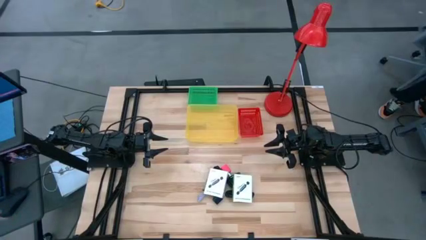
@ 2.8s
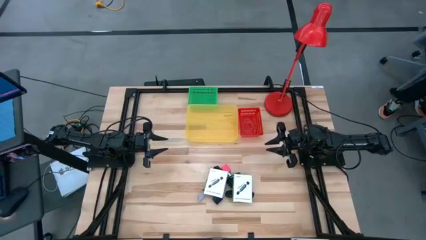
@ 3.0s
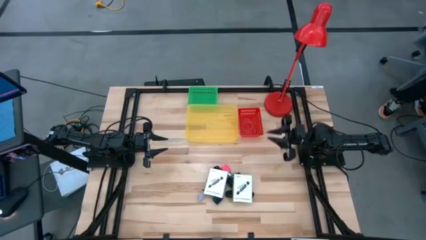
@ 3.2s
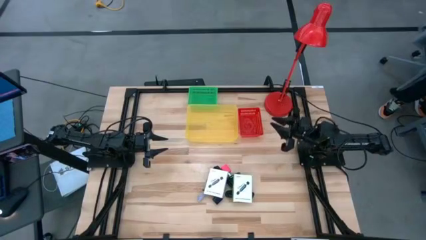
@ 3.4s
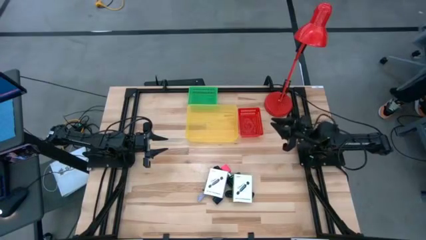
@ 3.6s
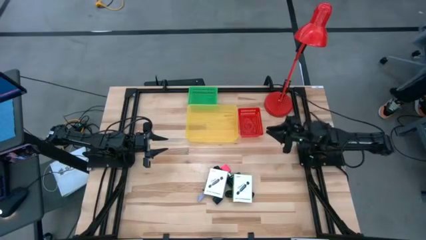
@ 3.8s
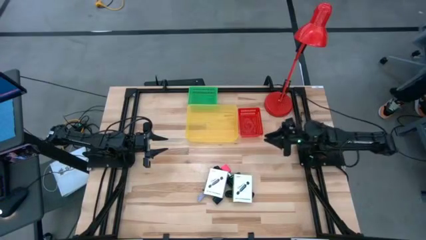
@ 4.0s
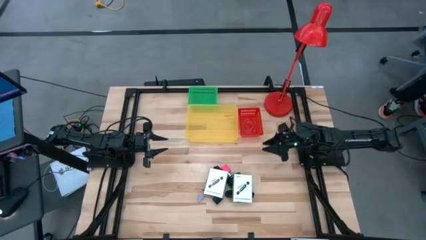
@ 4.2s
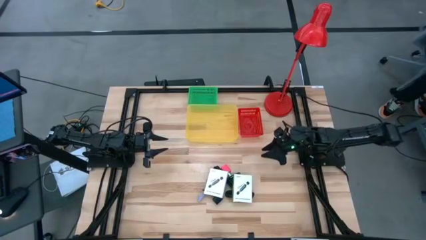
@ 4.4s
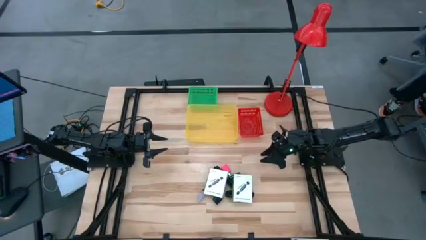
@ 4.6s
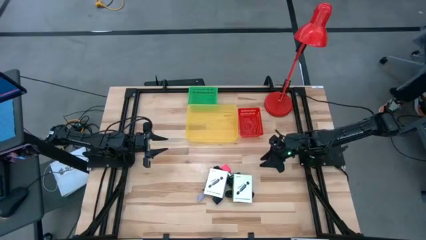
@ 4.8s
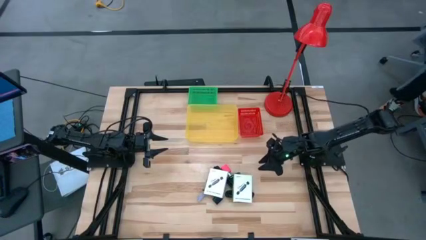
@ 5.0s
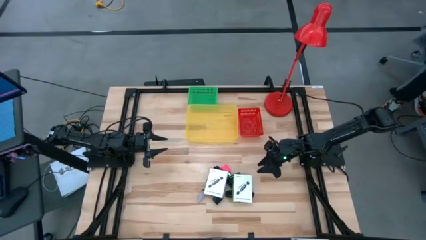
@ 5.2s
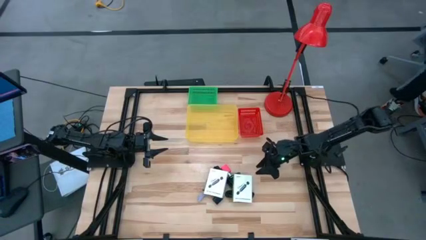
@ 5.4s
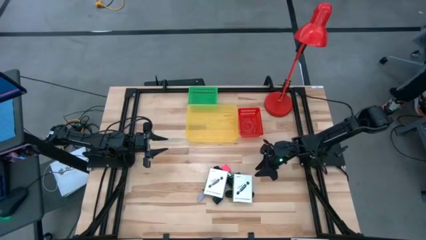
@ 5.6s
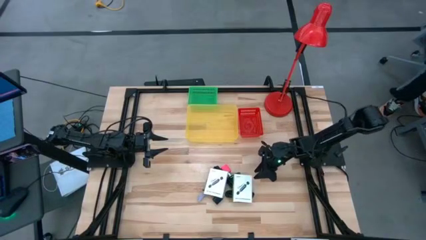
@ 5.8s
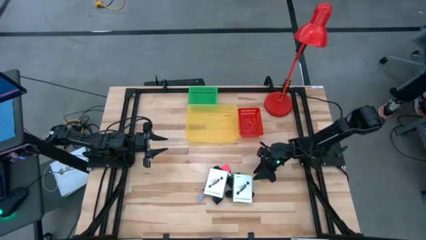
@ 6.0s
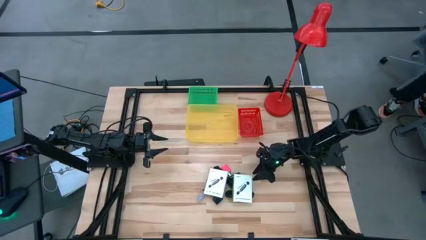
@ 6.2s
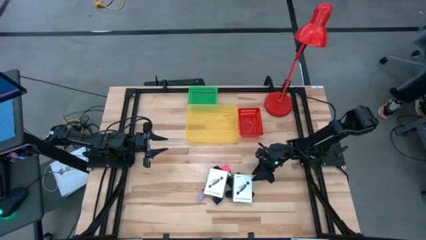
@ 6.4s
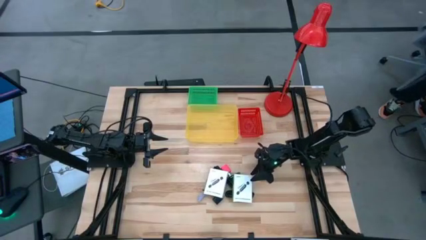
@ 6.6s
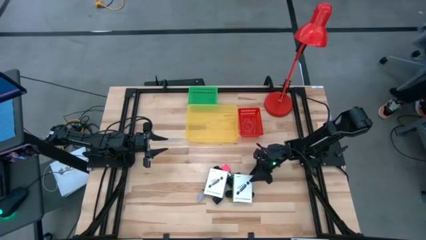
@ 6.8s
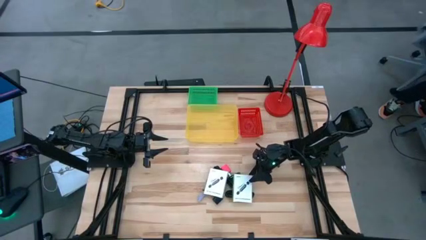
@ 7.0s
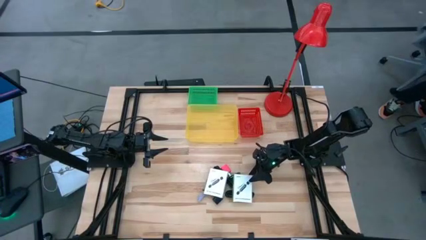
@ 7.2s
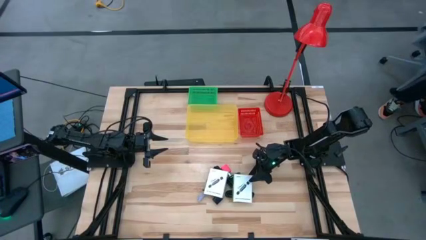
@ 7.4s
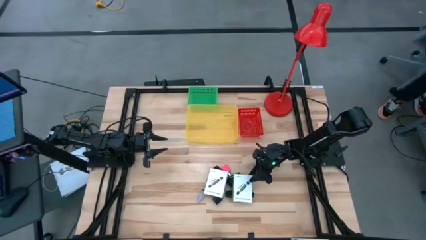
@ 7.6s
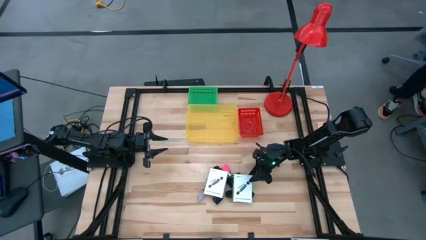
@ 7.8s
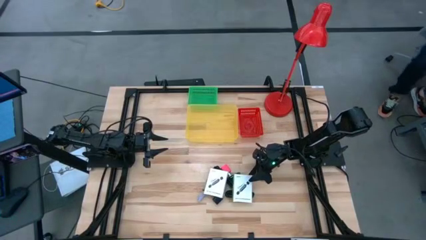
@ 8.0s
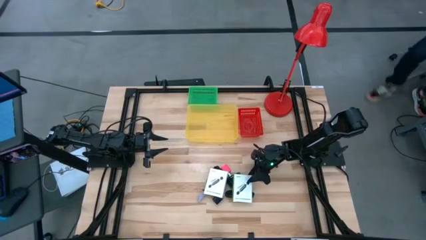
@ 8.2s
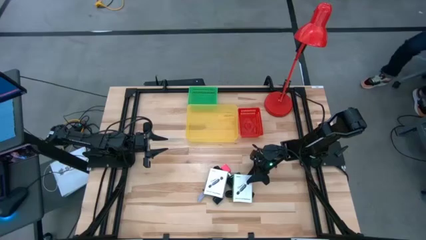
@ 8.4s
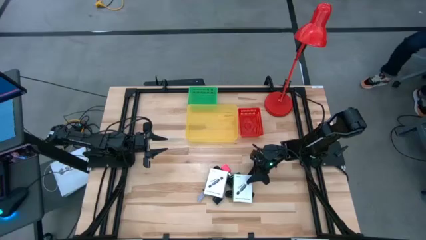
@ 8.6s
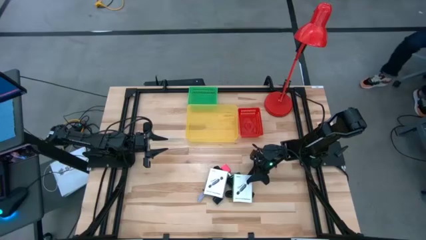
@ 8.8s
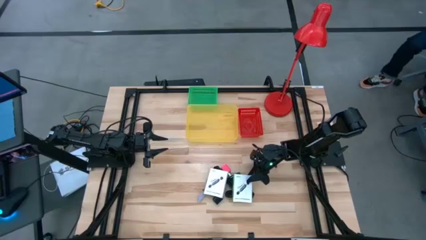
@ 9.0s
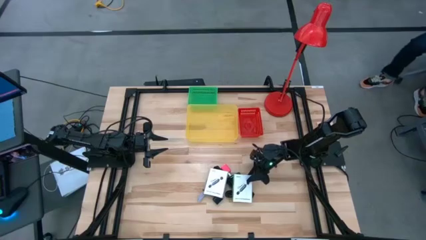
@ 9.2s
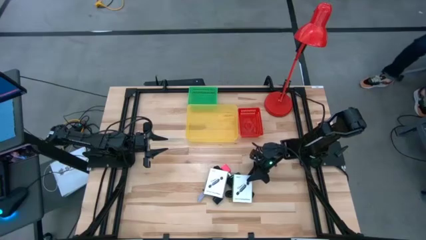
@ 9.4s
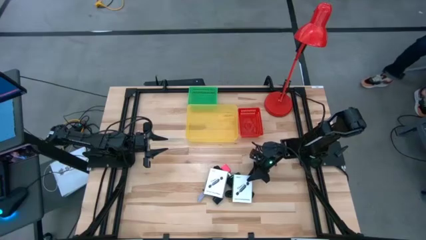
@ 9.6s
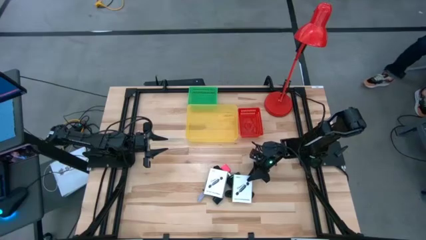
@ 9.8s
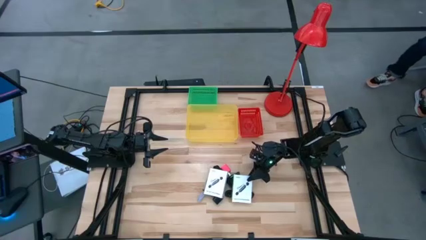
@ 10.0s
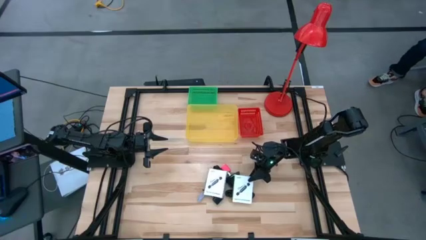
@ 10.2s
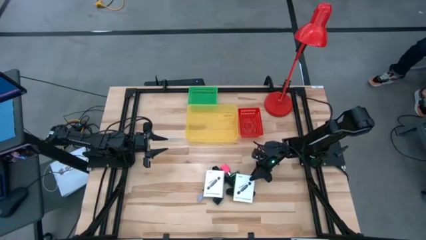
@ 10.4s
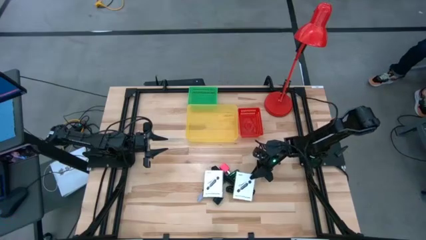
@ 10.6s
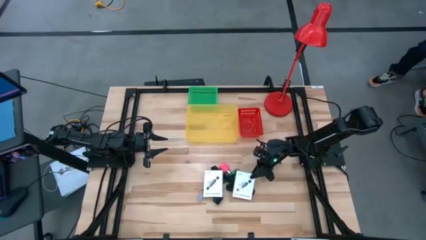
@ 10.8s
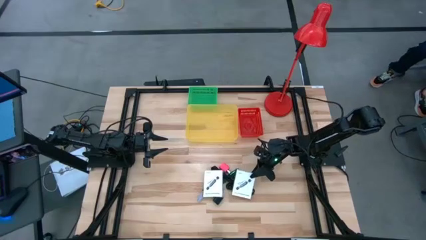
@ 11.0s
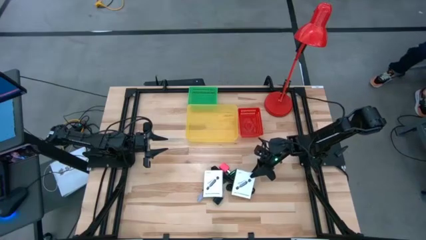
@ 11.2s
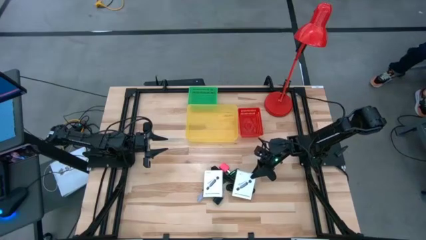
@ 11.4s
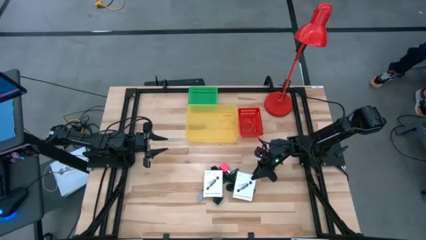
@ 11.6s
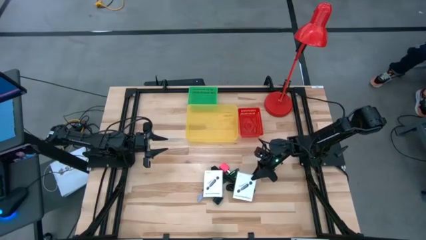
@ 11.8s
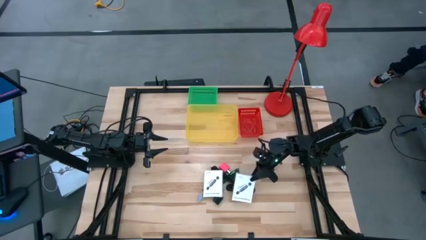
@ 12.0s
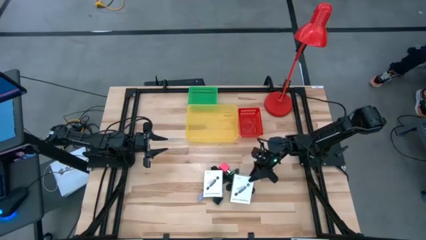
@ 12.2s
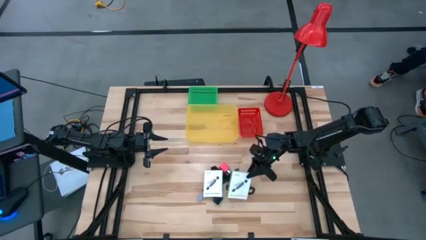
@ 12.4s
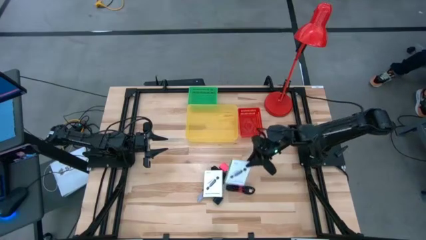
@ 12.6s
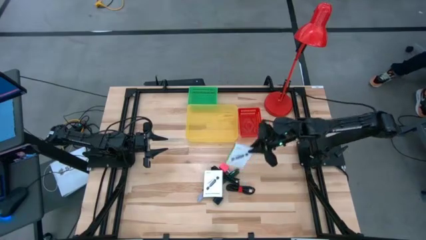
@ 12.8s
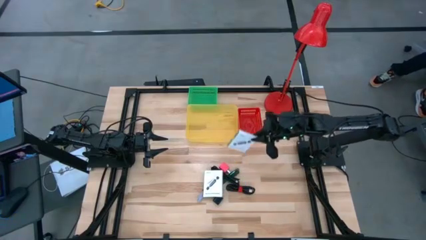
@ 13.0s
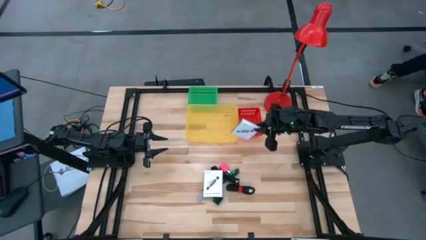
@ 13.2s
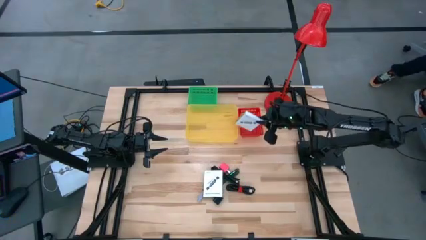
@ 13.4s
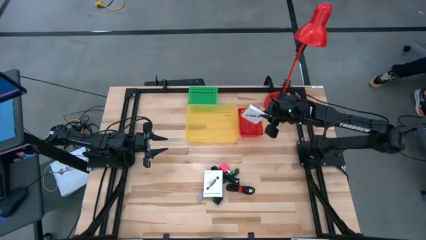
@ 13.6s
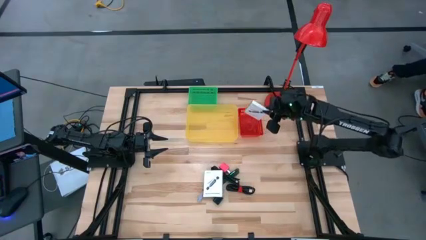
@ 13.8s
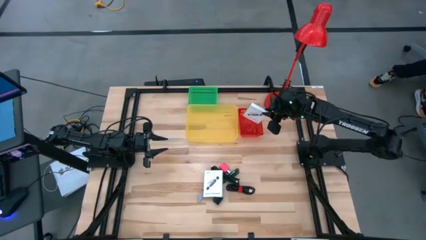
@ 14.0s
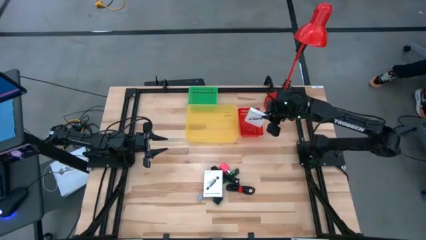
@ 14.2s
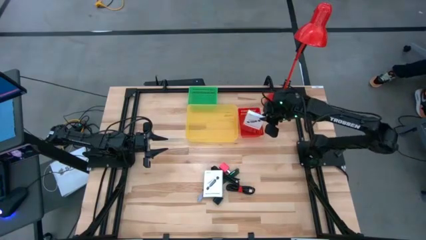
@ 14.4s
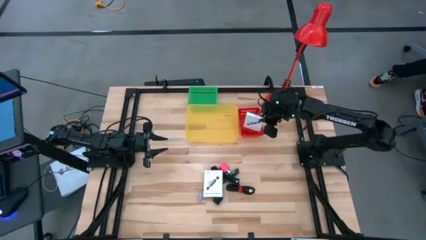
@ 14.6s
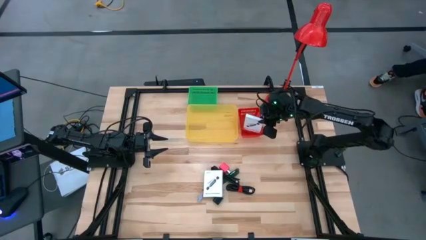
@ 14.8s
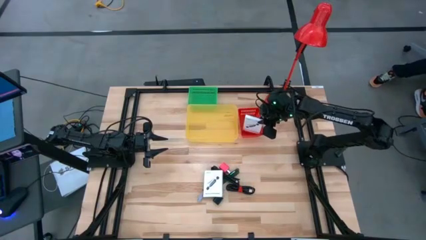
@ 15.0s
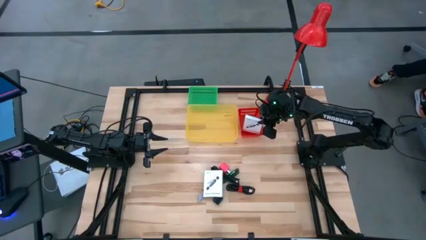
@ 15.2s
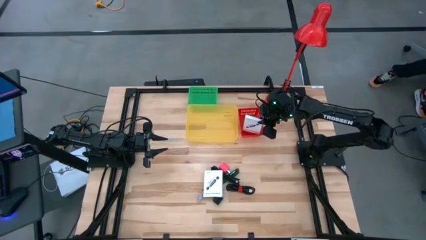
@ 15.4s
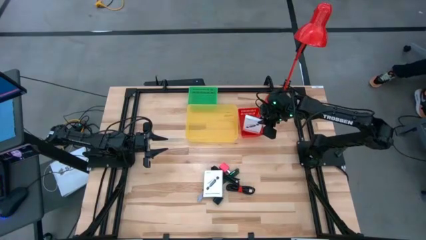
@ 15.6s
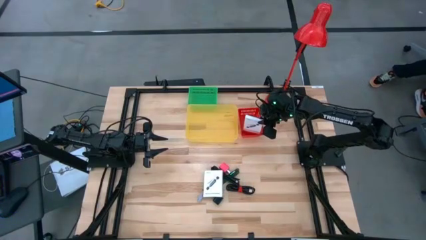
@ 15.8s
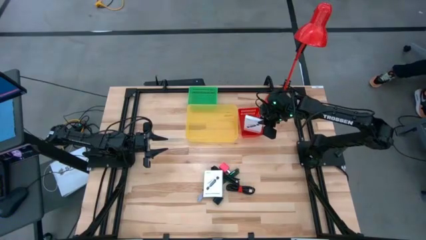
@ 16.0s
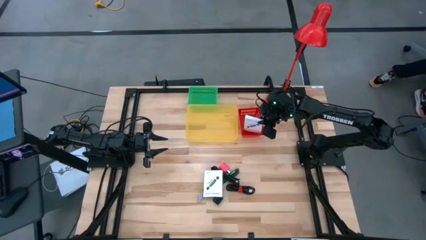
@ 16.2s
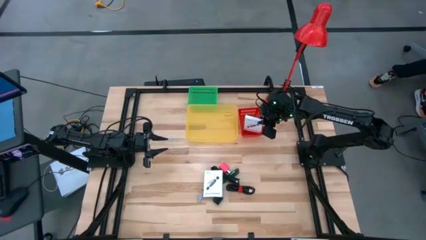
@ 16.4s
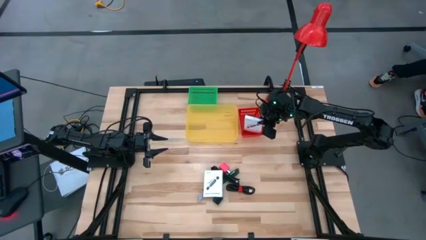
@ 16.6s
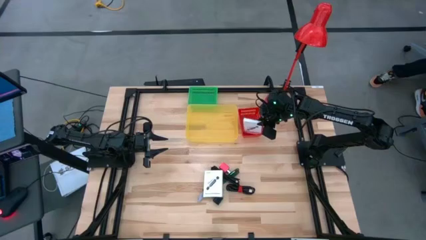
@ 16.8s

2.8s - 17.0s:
Task: Pick and place items into bin
Put the white card reader box into the red bin

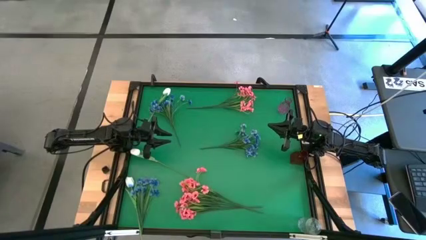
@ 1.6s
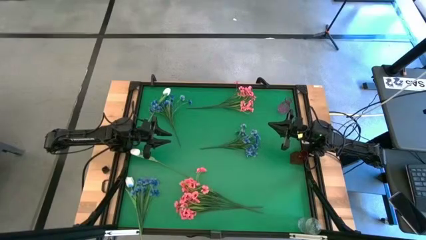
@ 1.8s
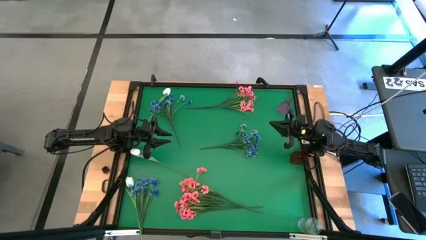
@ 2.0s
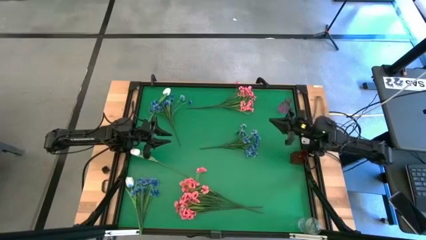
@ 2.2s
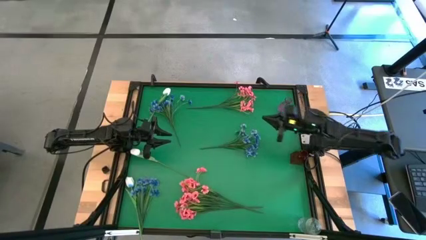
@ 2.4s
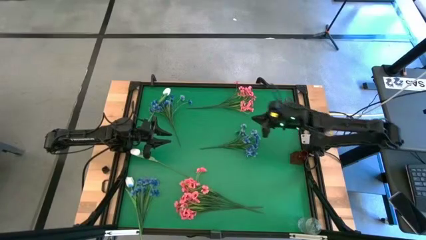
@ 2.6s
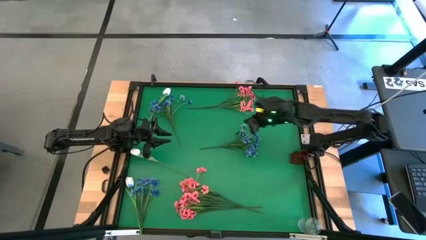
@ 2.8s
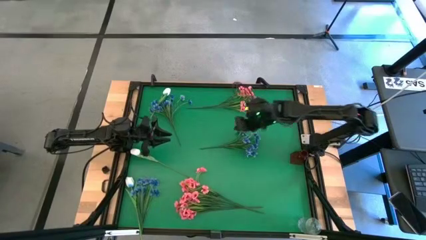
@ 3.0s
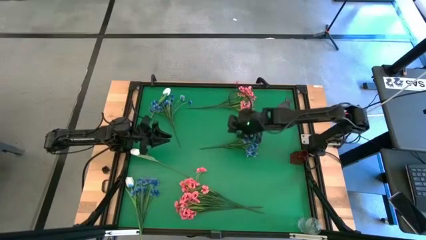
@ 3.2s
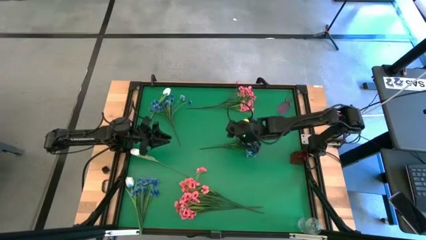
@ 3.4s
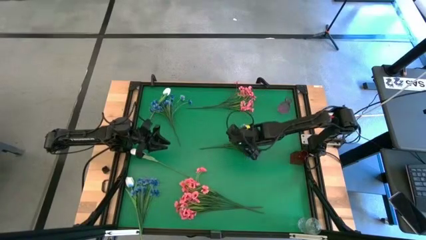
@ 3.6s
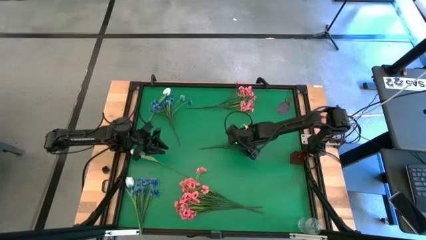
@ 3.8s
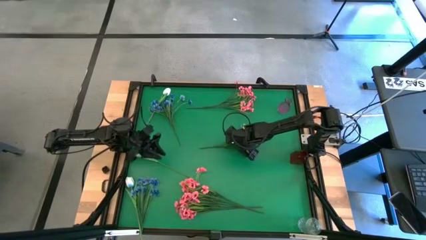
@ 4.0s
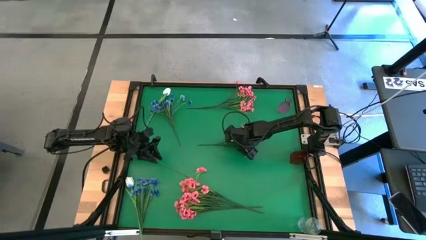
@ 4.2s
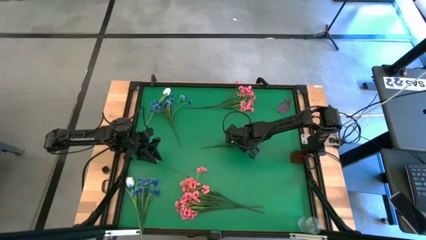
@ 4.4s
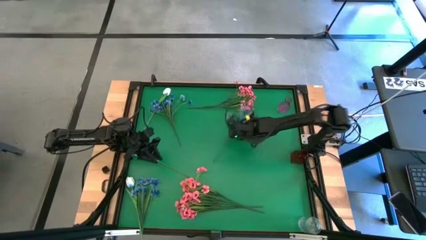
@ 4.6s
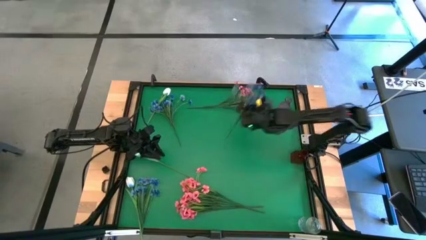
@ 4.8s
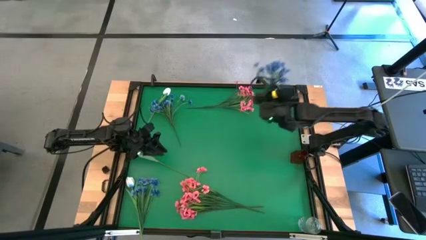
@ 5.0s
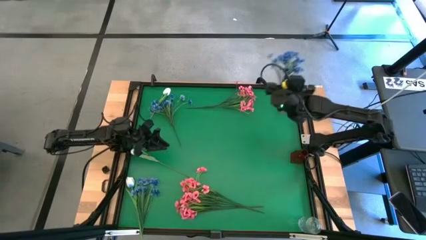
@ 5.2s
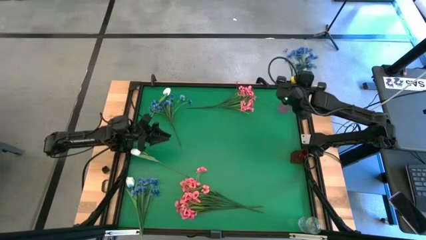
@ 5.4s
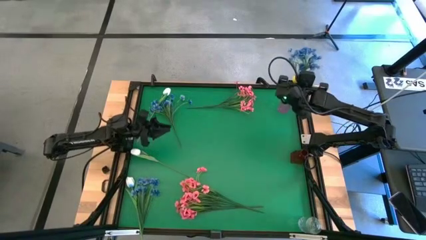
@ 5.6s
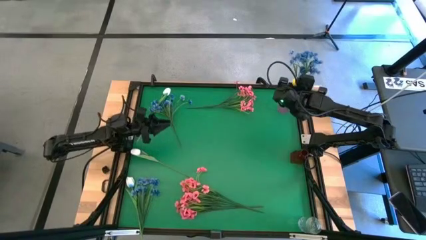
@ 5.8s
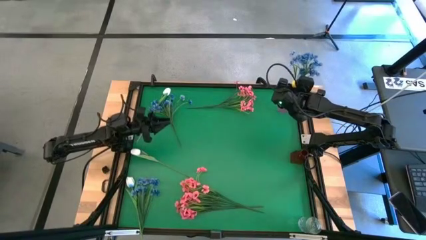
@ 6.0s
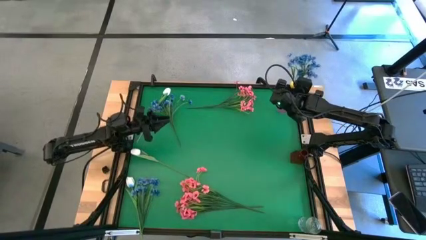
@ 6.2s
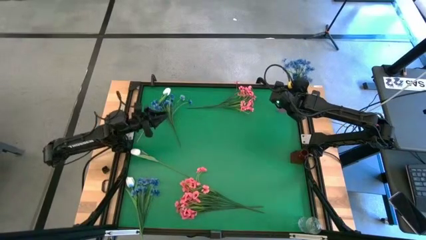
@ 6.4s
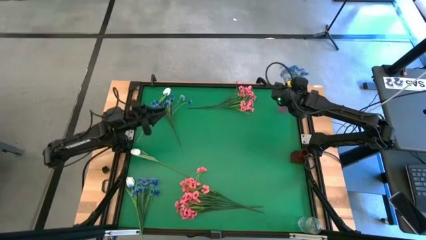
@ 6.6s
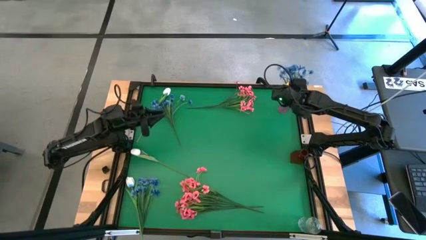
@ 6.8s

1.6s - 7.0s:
Task: Sort flowers into vase by color
Put the top right blue flowers into the purple vase
